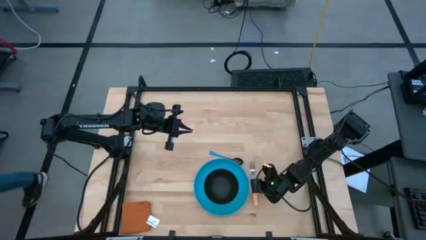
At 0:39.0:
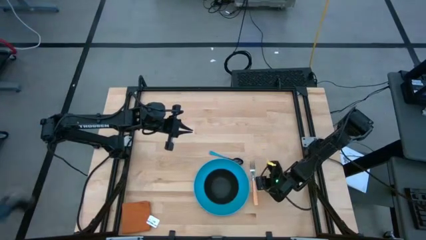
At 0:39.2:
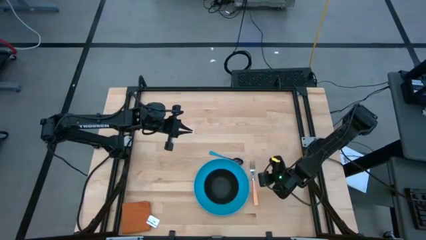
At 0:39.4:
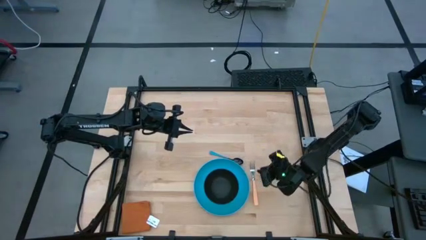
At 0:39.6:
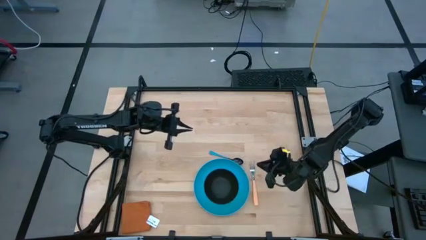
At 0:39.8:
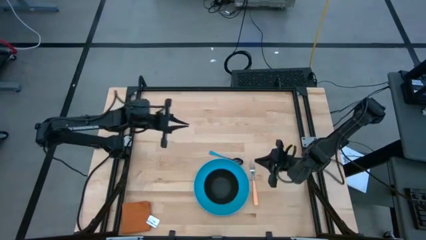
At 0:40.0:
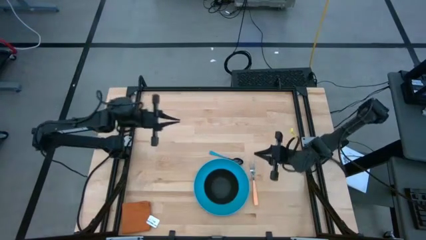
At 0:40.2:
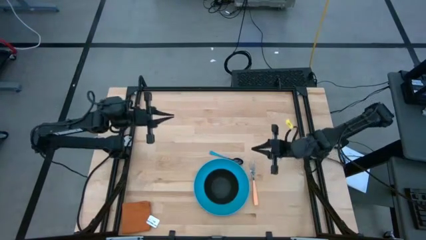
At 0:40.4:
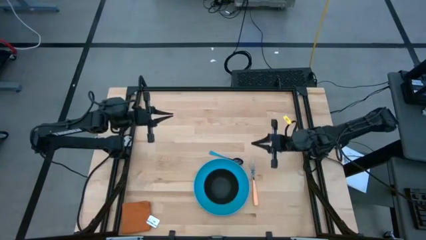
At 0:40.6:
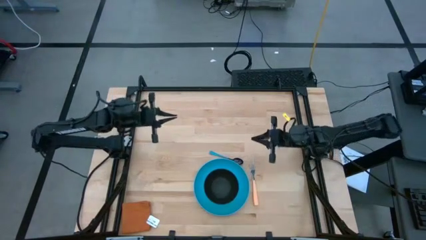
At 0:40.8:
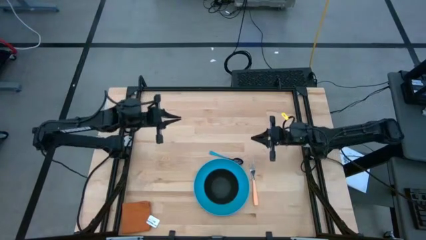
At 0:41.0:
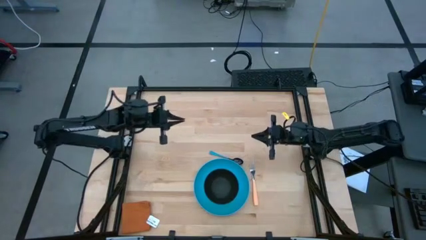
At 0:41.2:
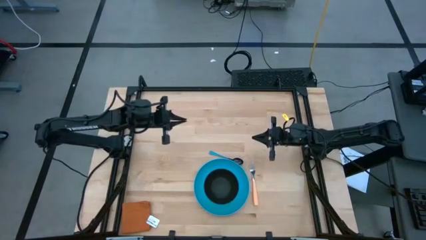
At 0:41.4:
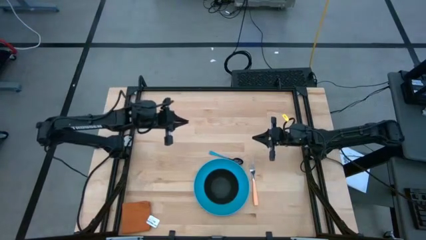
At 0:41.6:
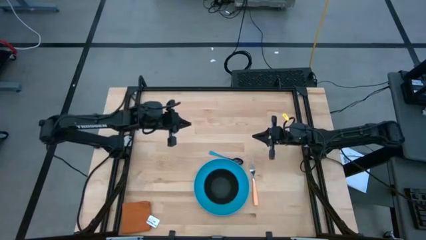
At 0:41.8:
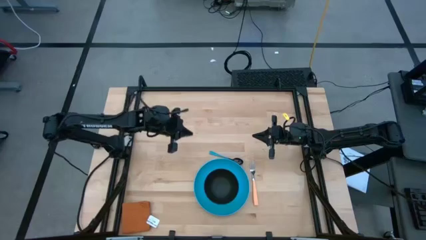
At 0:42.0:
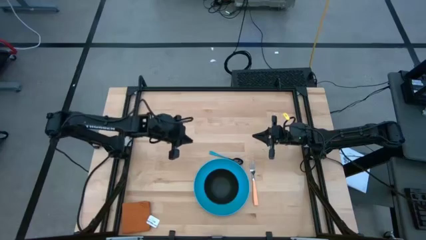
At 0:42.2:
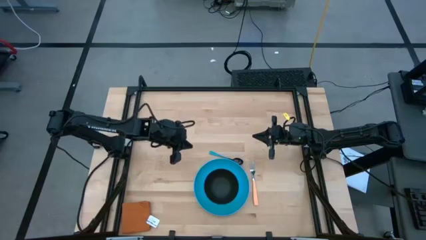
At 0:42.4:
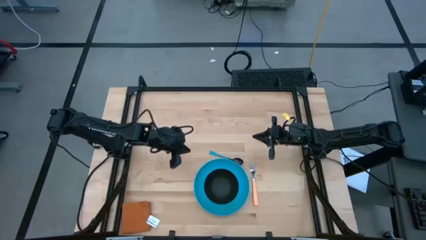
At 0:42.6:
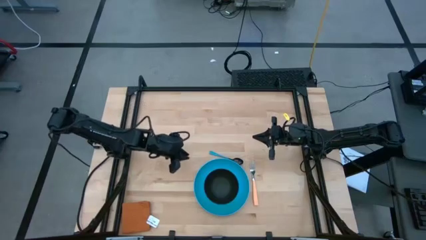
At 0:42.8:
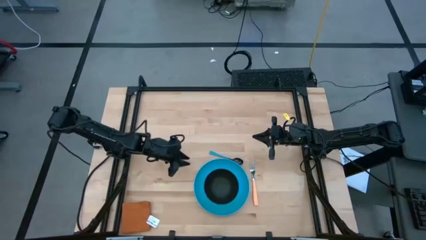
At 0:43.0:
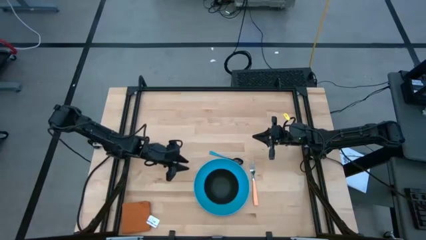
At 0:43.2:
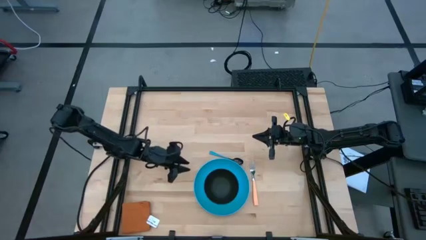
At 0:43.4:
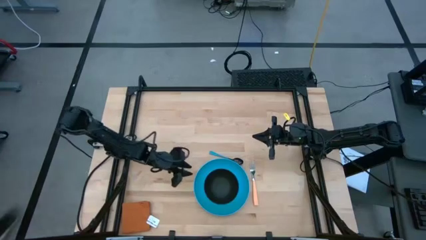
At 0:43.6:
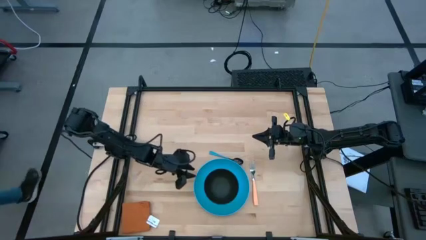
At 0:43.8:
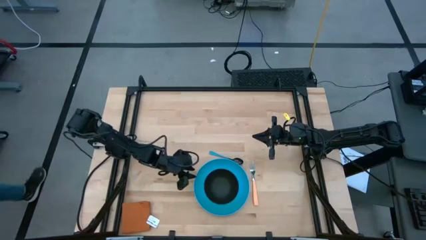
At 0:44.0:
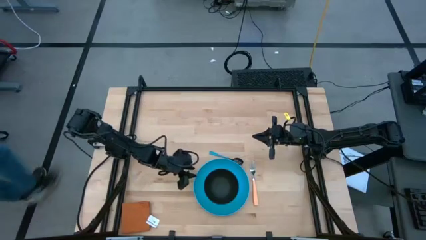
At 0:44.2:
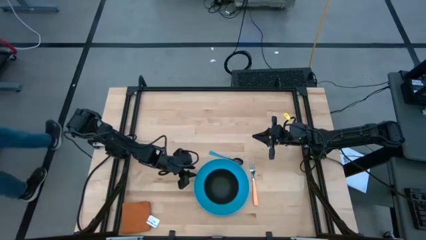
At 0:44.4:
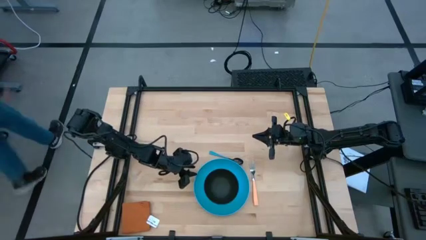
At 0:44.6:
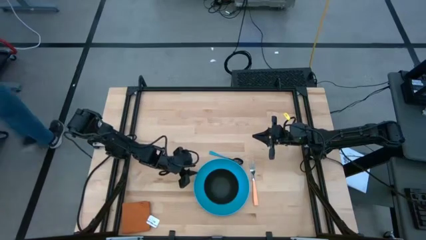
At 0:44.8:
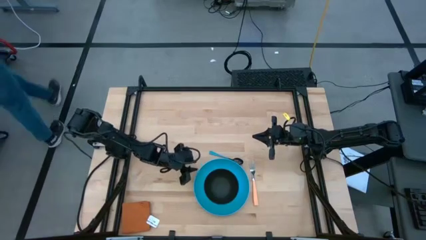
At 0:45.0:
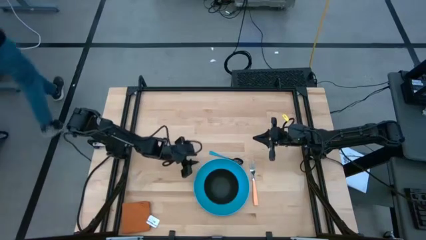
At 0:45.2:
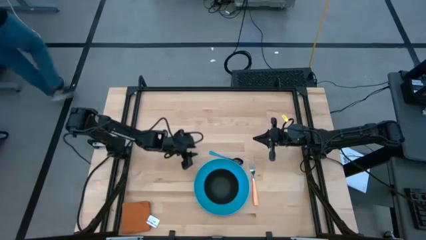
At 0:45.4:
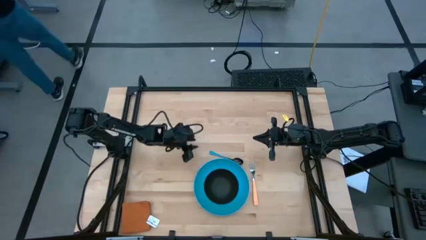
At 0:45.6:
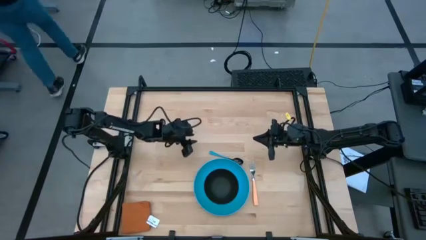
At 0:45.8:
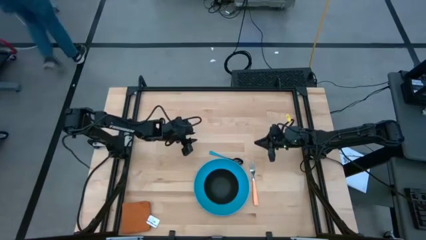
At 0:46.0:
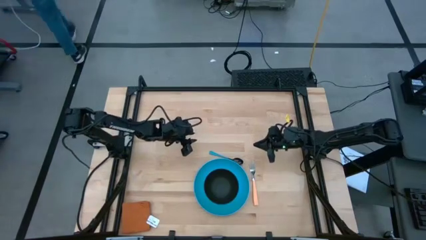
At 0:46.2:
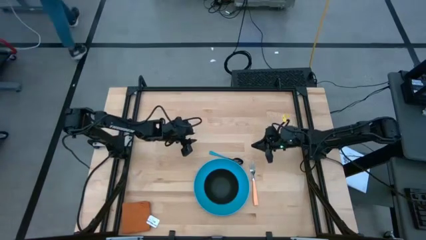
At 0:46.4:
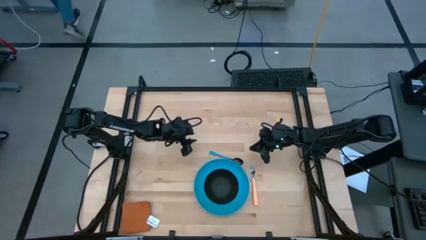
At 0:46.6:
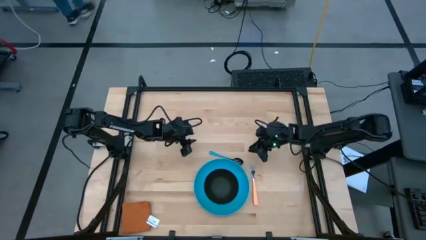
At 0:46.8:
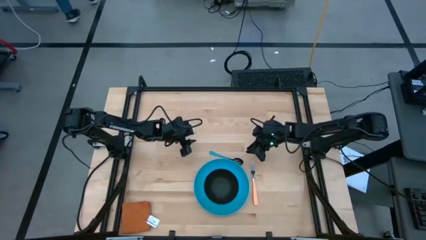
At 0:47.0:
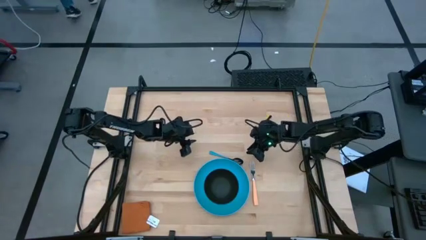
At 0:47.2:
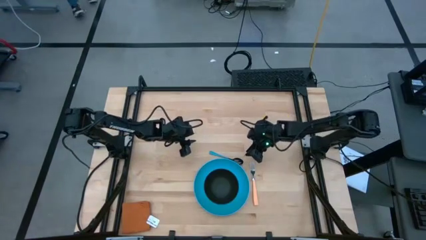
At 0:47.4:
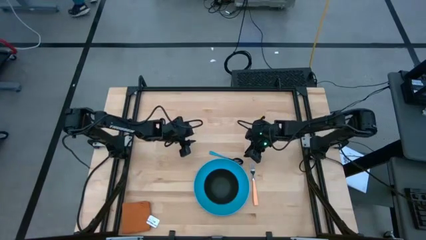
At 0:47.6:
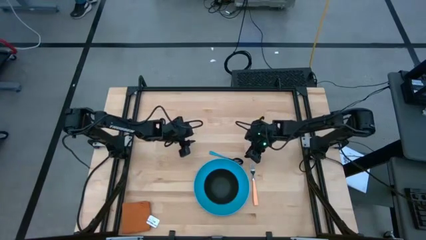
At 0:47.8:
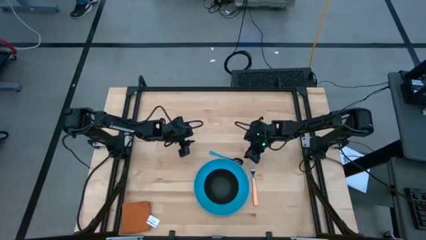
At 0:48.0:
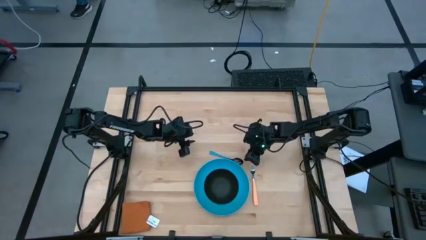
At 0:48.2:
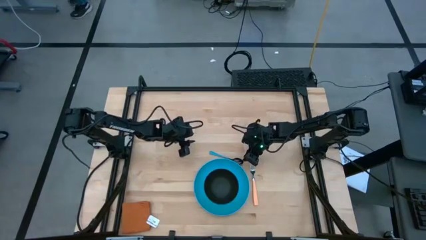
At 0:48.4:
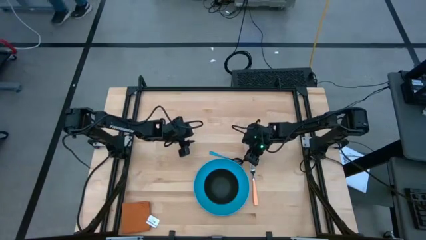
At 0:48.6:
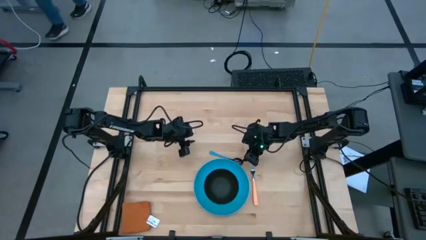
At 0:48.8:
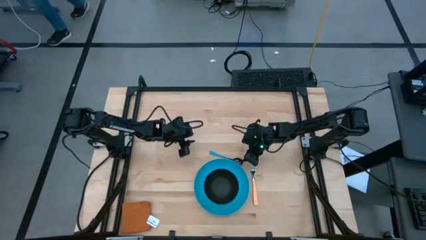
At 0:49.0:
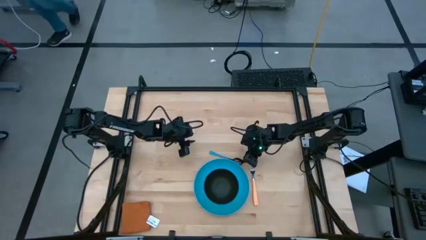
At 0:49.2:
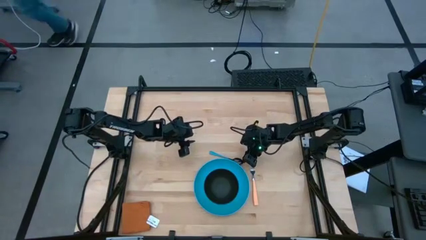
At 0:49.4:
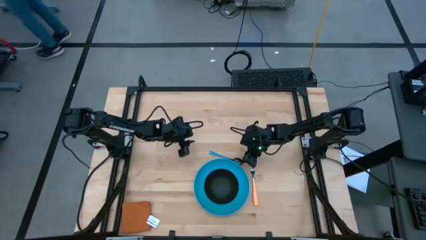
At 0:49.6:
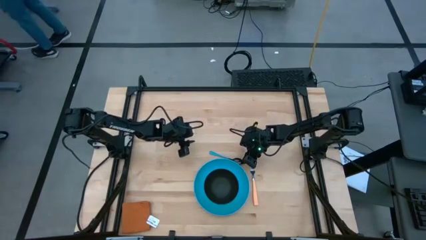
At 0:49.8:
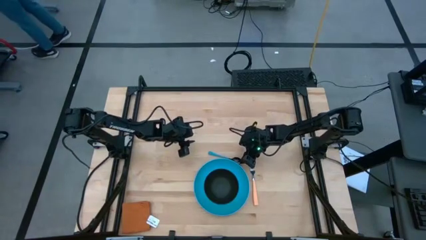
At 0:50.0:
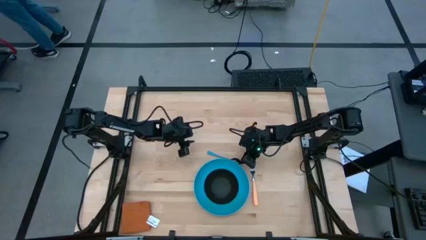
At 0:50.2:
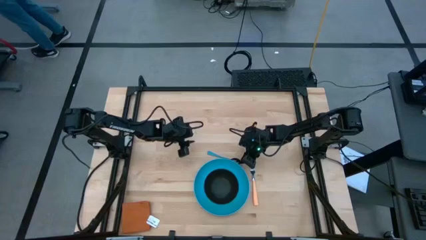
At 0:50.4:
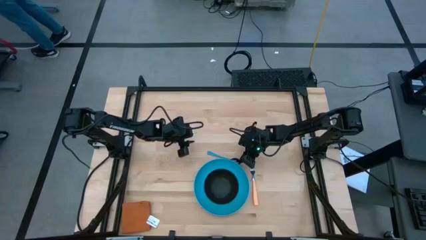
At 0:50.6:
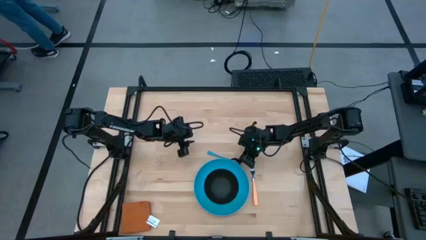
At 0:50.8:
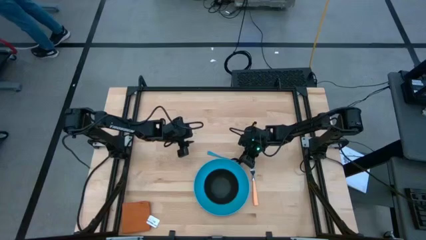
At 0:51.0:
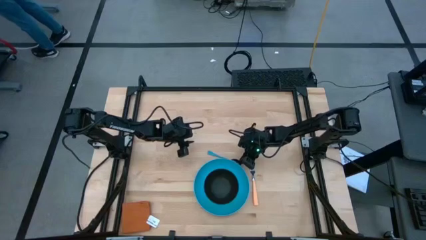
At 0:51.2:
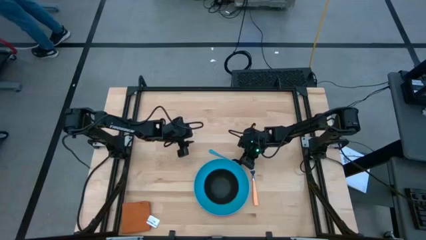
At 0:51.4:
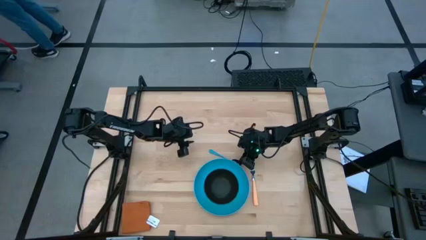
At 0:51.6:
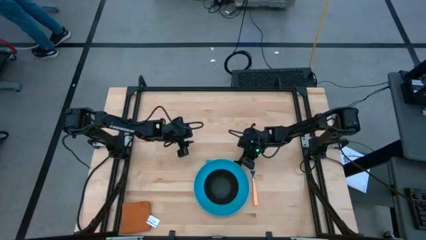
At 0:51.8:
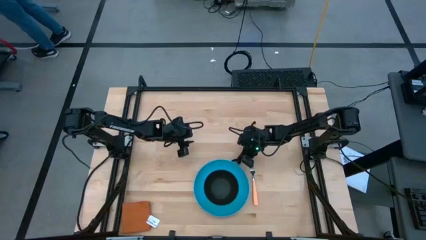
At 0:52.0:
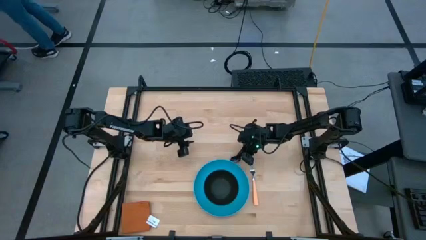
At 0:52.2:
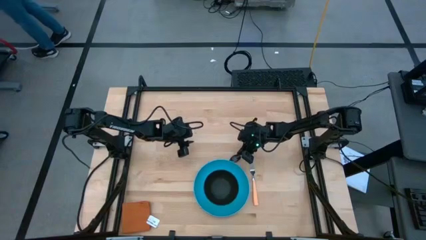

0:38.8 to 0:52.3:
Task: Set table place
Put the blue spoon into the bowl
